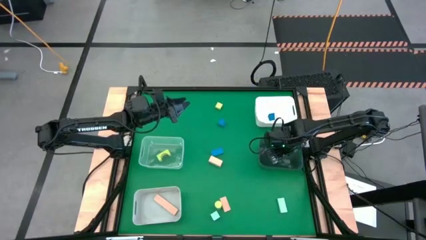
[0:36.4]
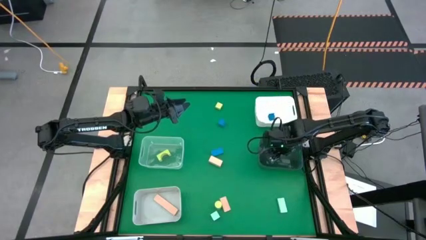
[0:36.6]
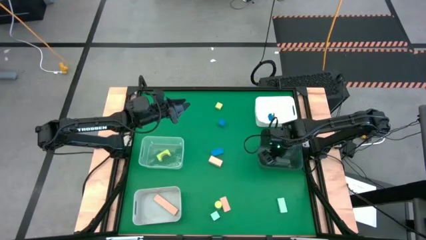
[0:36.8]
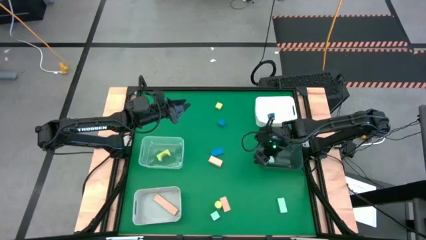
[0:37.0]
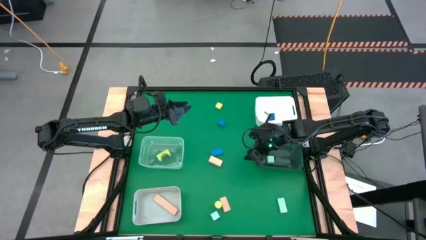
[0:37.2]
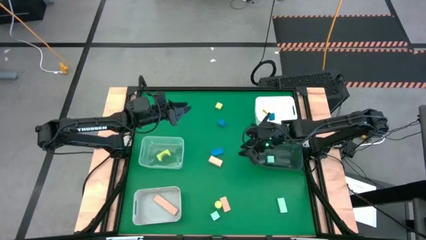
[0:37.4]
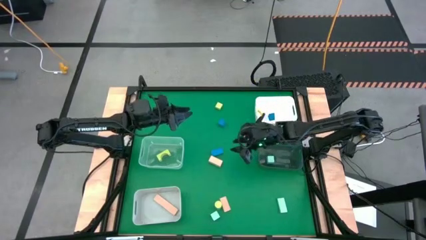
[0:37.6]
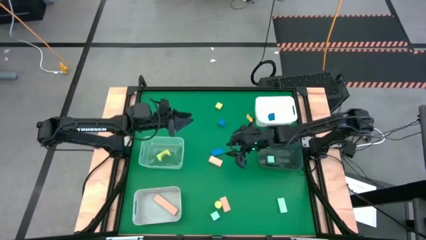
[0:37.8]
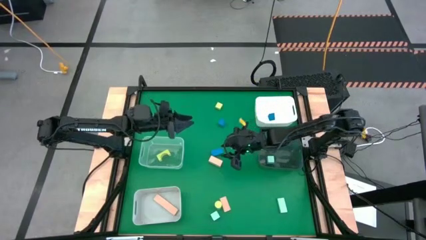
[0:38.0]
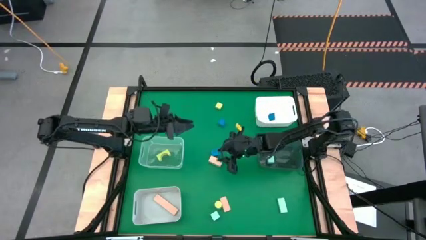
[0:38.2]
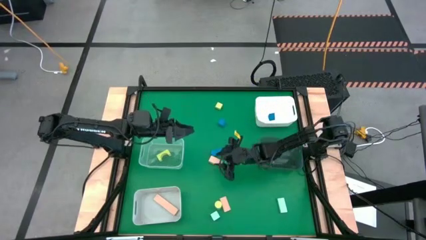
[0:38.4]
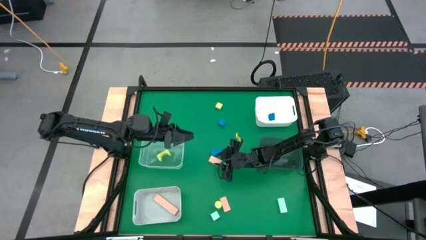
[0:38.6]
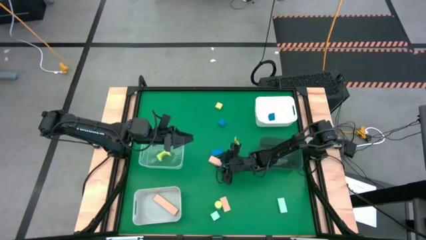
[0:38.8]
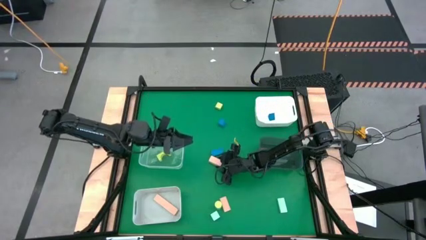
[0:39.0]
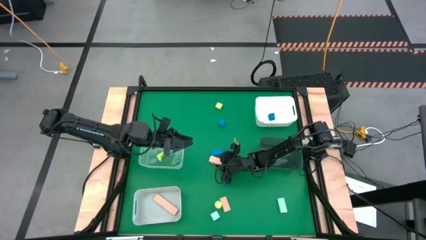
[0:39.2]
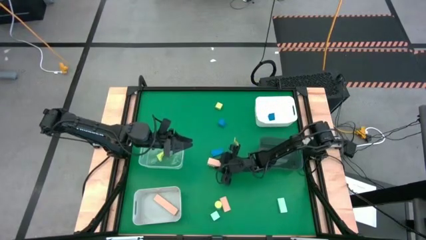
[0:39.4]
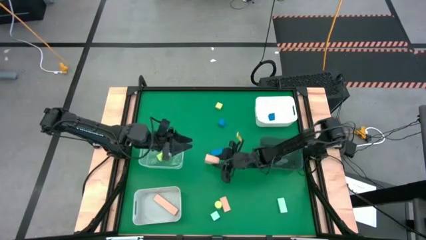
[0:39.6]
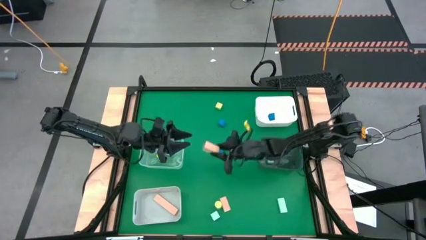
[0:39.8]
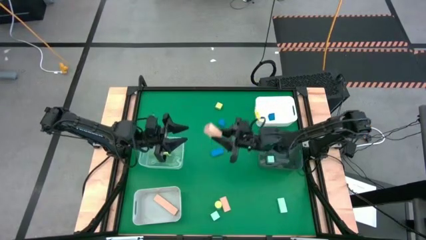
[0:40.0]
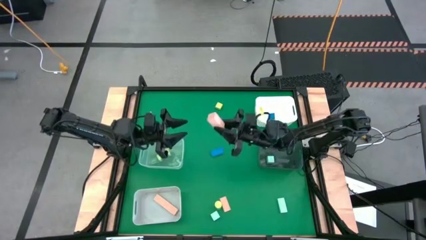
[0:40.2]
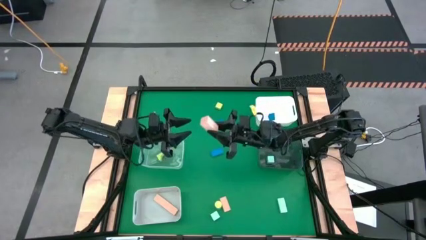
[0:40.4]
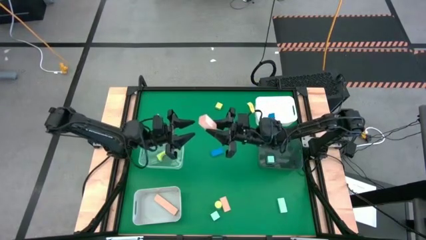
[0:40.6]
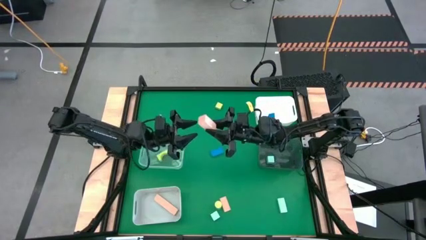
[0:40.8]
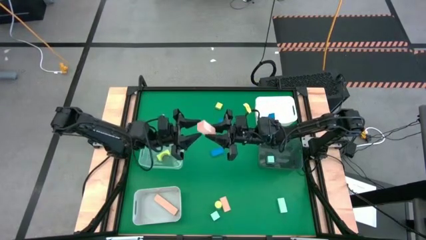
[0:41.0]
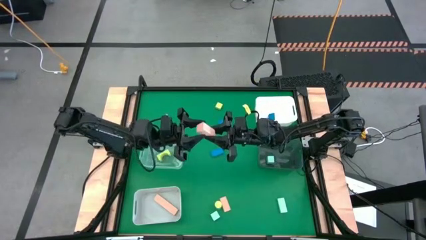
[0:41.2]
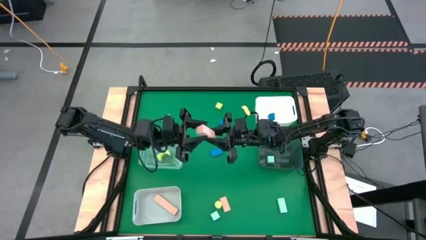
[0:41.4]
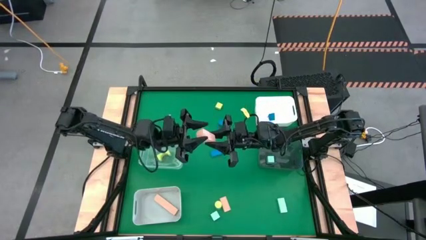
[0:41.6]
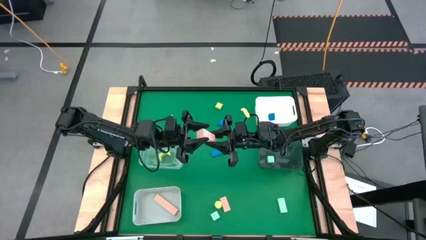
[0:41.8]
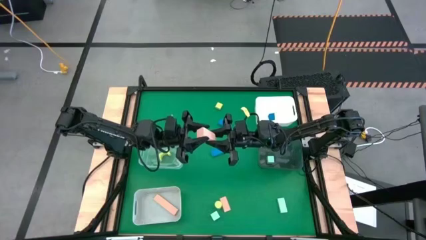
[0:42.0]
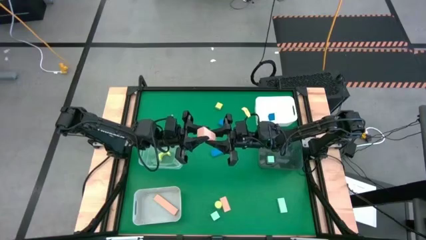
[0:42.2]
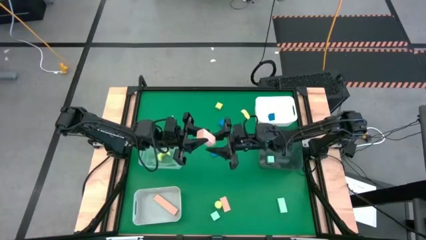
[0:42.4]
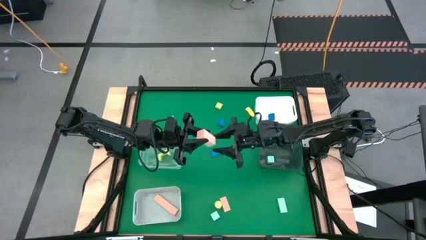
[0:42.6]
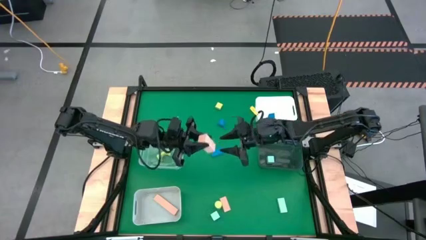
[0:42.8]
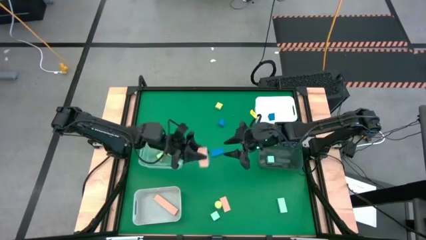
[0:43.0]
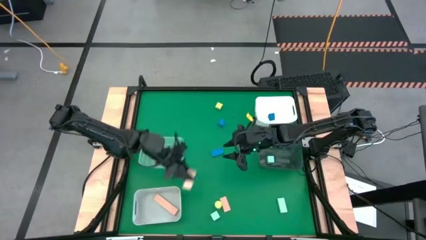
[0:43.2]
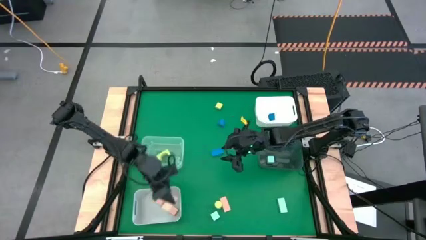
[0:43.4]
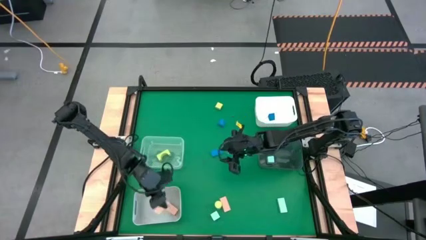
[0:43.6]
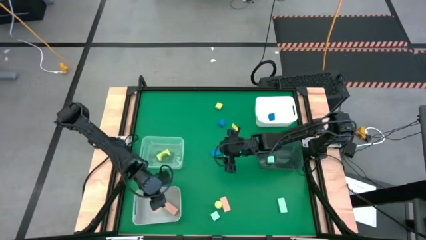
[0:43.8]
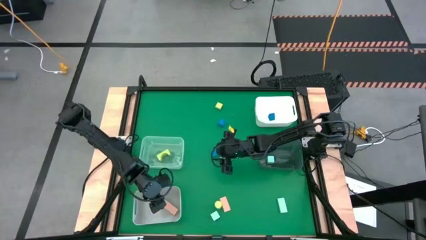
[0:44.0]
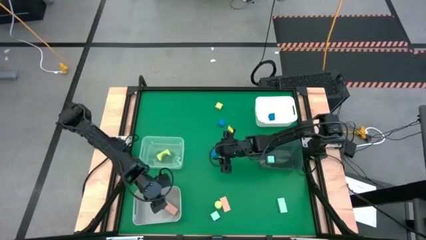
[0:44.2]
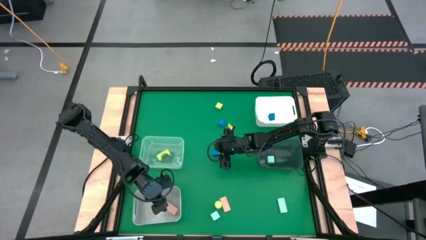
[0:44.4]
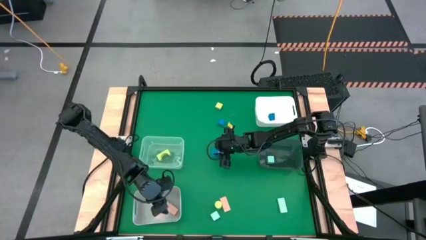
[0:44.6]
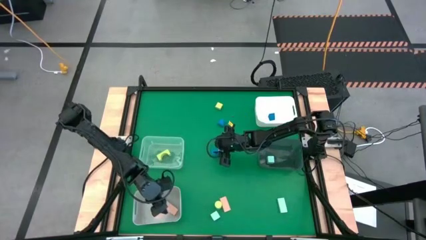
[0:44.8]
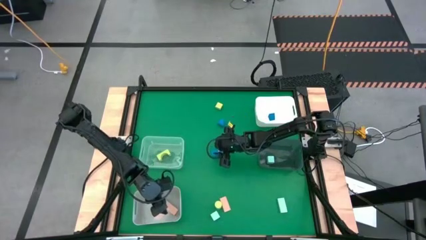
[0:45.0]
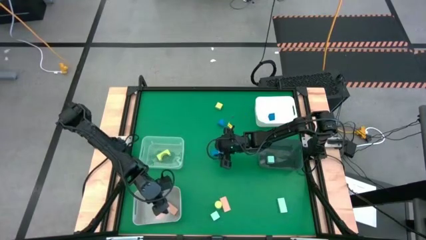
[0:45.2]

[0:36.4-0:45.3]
Task: Sort & place blocks by color
Put the brown block into the gray bin

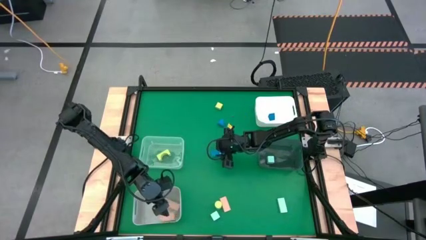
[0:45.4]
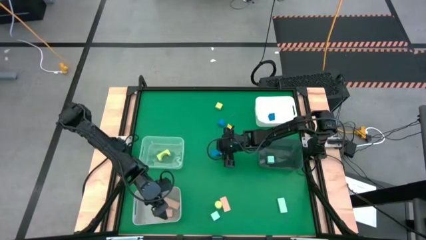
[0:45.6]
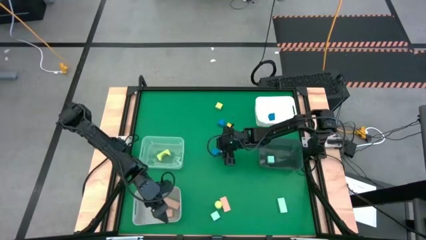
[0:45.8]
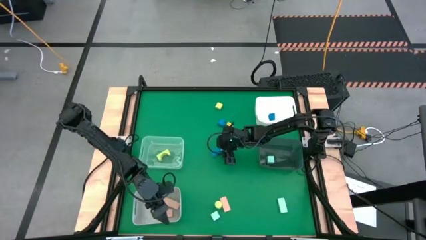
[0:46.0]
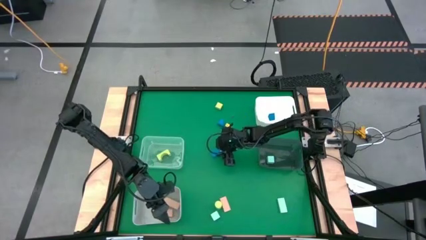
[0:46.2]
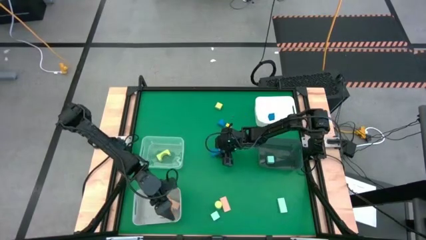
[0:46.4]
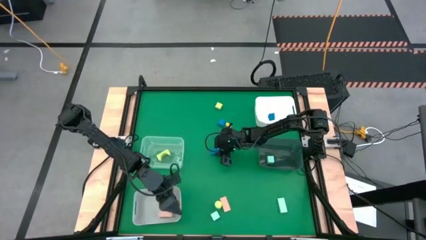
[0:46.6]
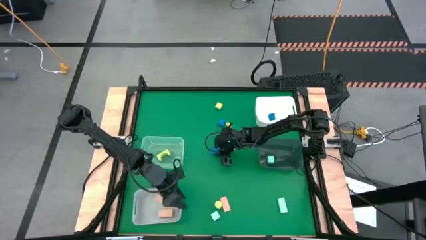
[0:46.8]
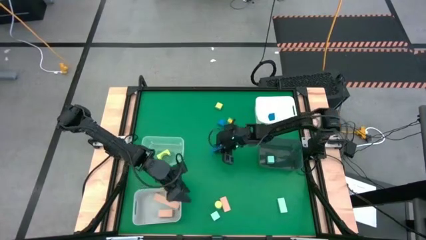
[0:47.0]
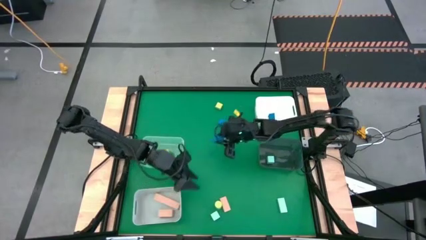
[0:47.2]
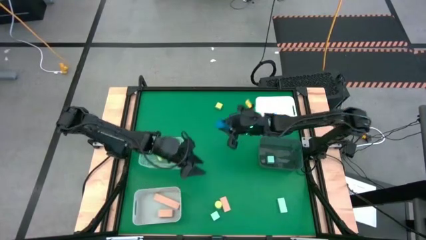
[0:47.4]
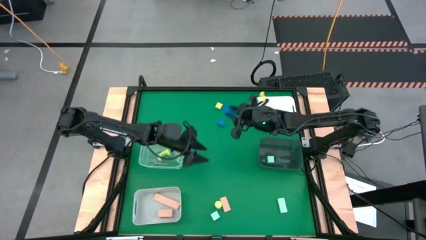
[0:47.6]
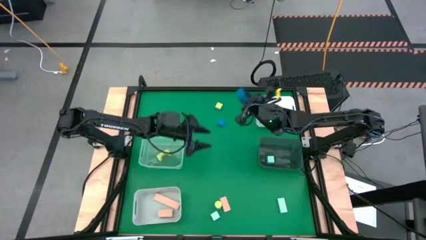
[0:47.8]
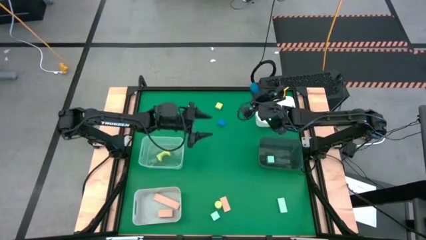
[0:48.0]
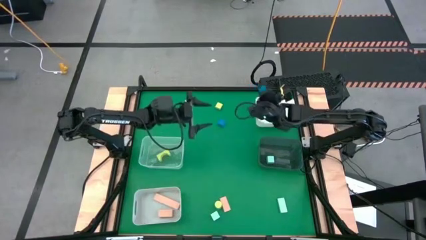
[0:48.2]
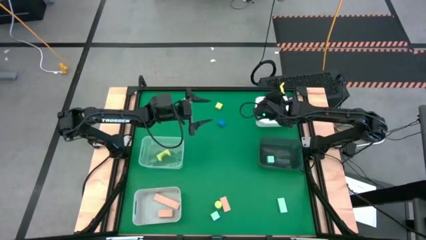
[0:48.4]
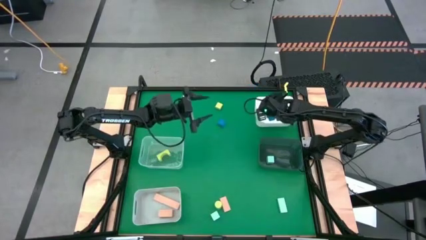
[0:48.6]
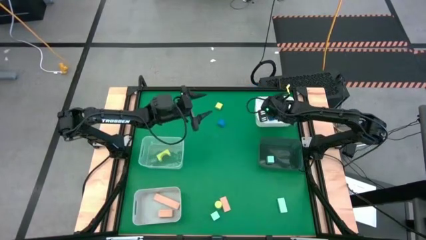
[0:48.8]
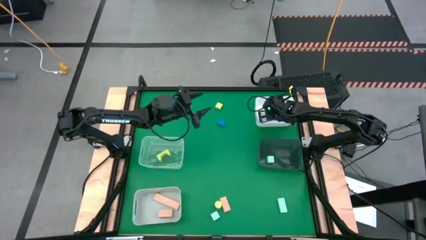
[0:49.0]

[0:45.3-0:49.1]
Put the blue block into the white bin

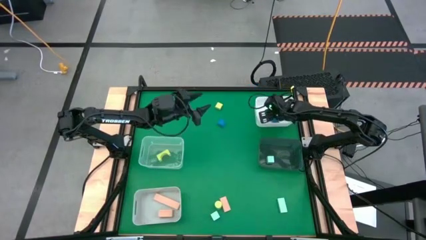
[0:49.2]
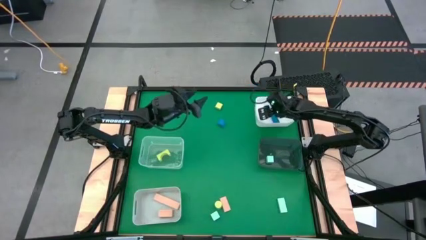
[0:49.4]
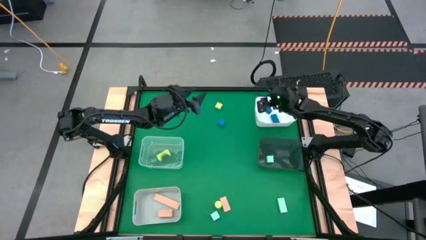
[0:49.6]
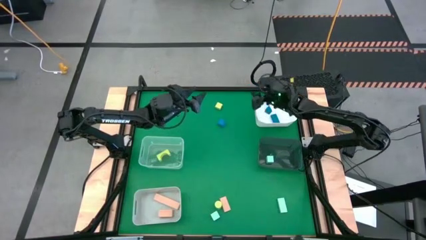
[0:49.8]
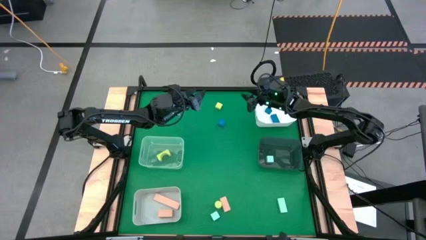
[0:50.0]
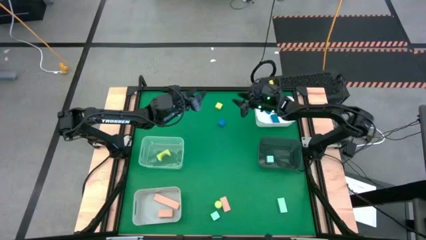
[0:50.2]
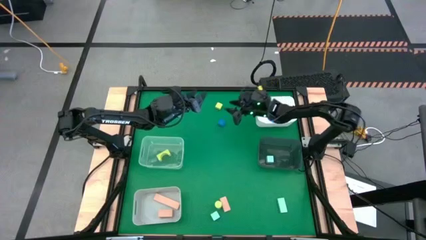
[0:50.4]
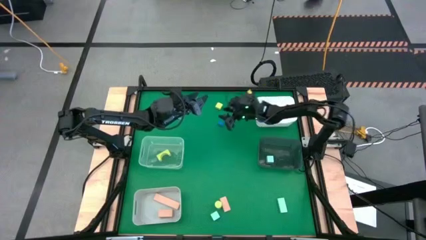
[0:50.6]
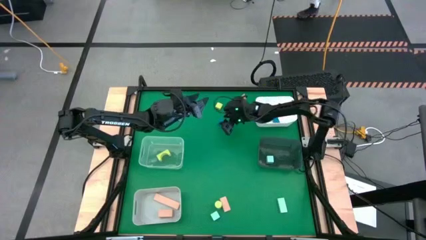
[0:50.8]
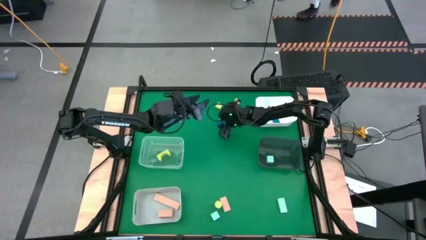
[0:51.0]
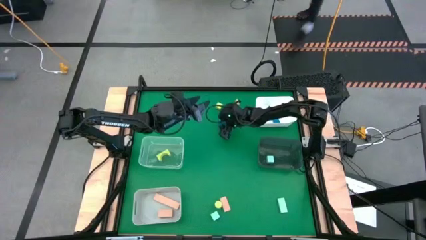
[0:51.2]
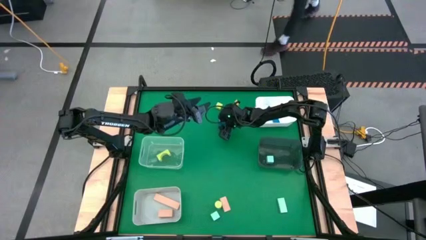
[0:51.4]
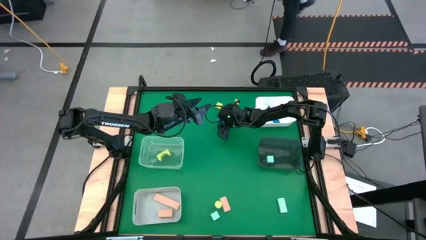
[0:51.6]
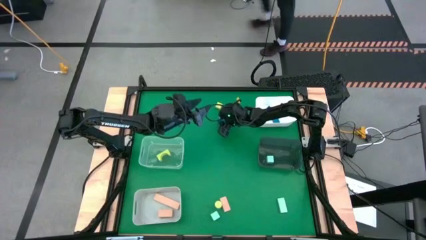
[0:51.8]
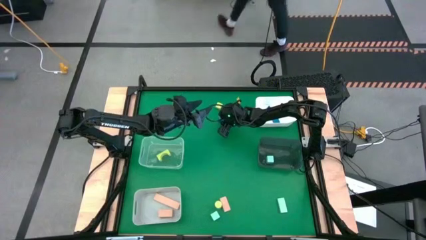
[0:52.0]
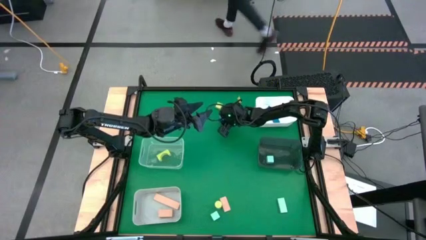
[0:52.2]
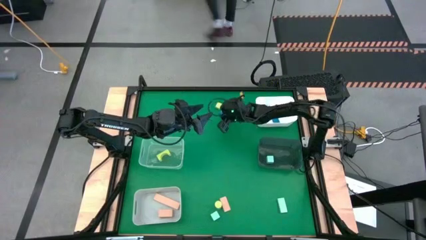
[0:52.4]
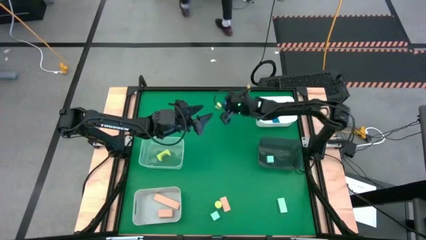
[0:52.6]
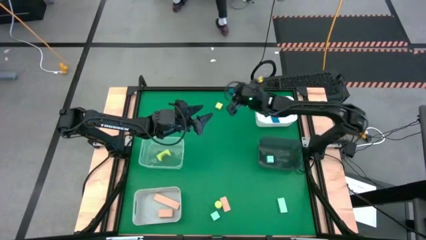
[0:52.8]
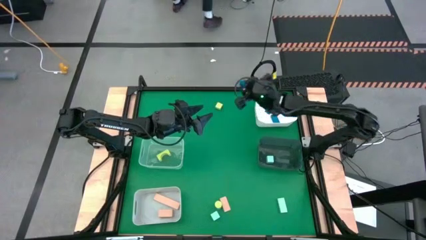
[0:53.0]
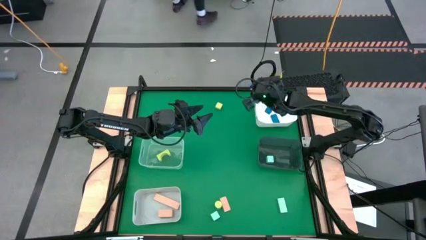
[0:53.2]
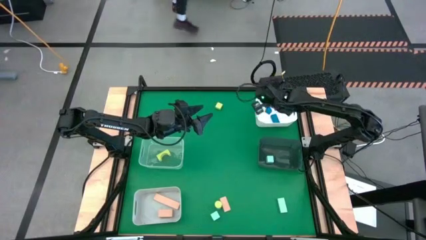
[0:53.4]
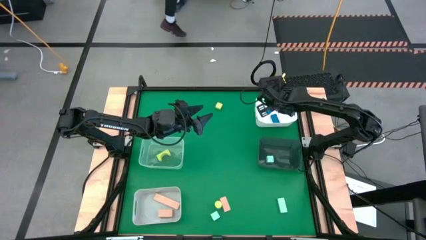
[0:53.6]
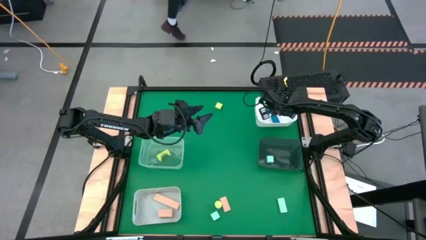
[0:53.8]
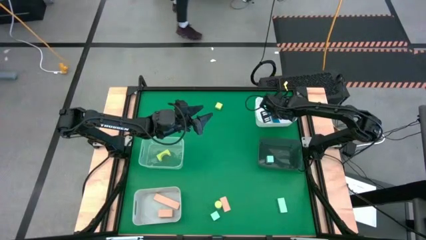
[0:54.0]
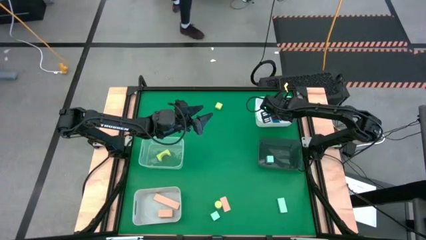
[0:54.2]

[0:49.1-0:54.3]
Put the blue block into the white bin
